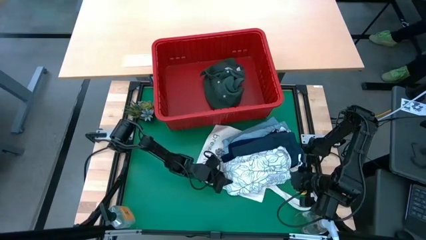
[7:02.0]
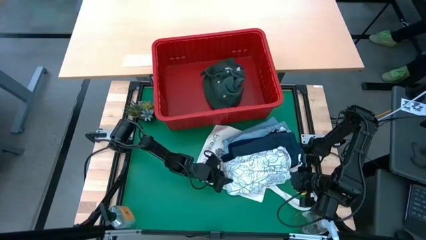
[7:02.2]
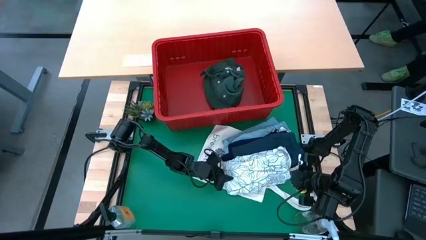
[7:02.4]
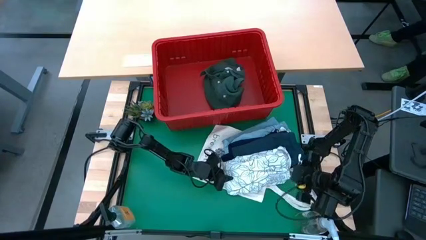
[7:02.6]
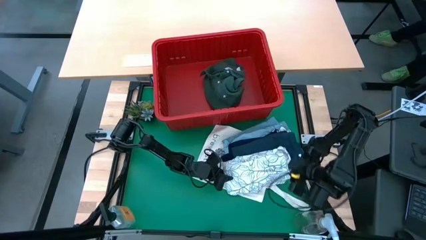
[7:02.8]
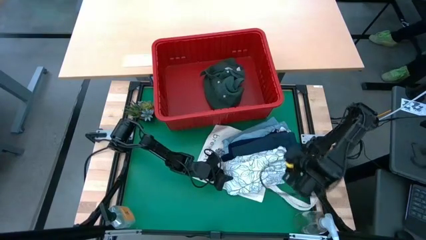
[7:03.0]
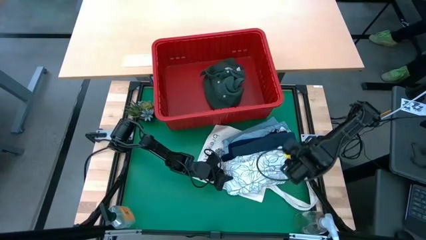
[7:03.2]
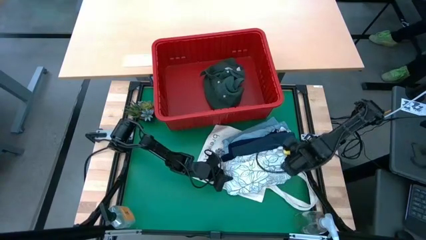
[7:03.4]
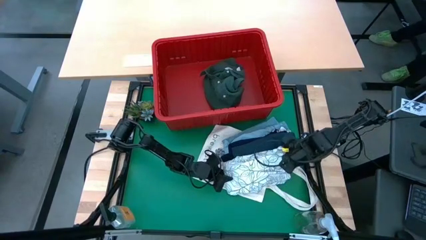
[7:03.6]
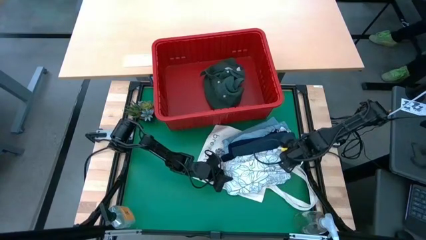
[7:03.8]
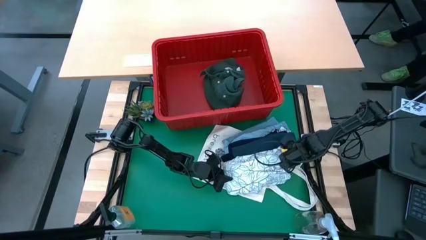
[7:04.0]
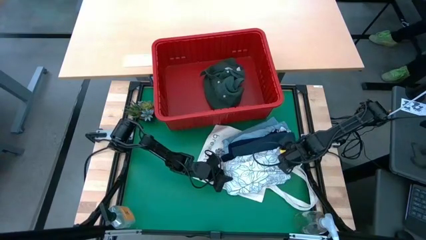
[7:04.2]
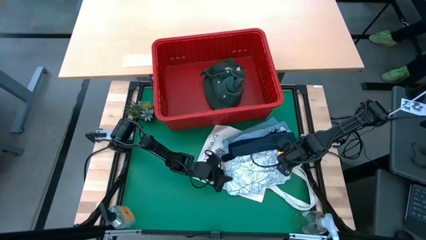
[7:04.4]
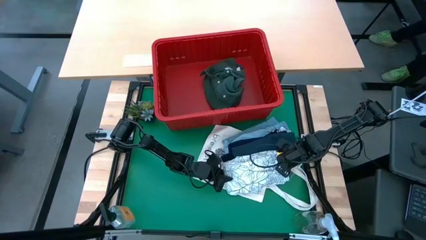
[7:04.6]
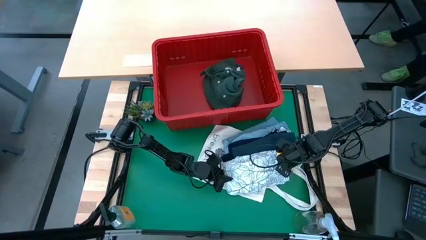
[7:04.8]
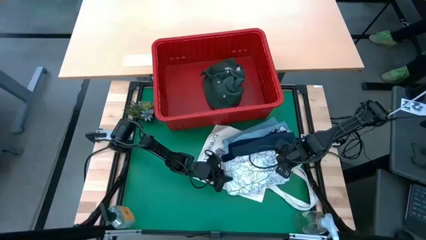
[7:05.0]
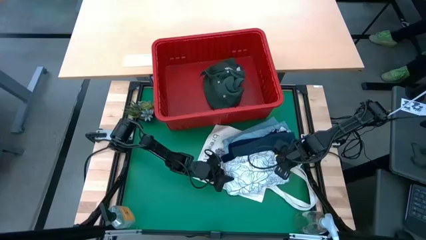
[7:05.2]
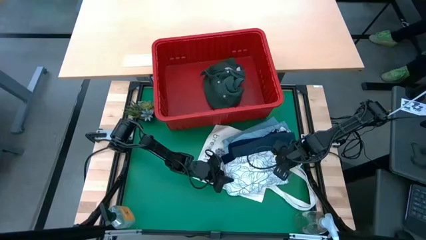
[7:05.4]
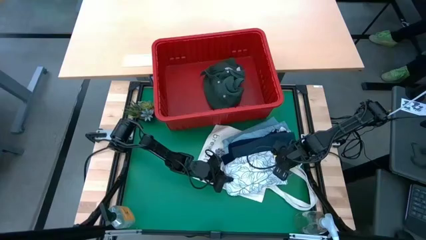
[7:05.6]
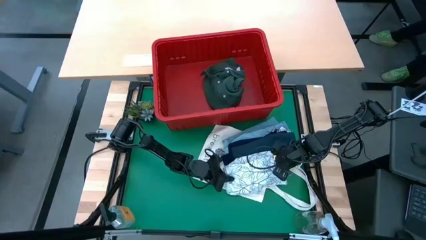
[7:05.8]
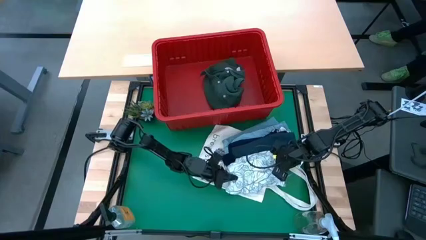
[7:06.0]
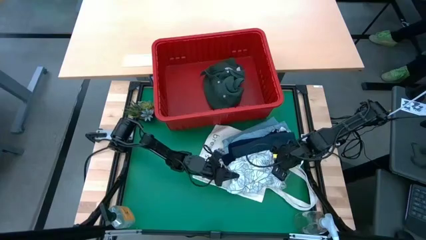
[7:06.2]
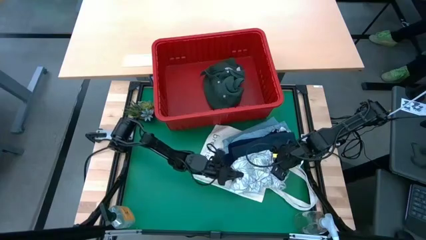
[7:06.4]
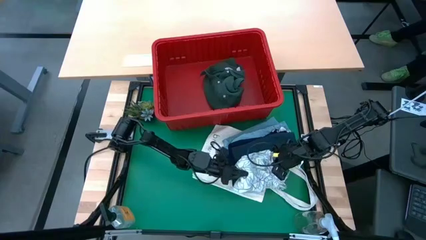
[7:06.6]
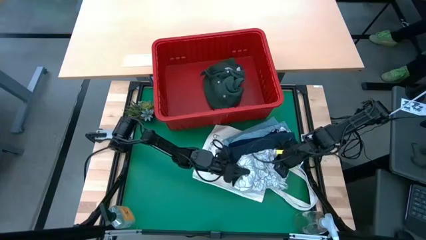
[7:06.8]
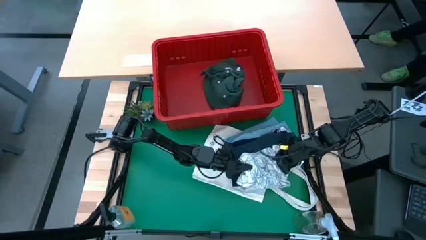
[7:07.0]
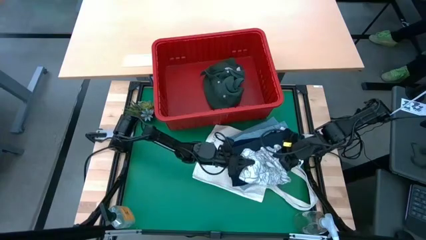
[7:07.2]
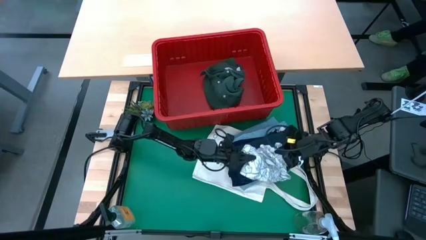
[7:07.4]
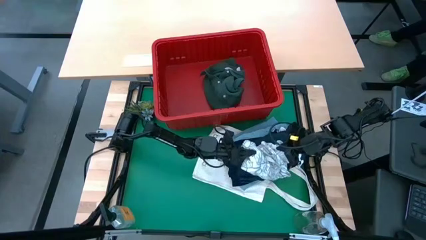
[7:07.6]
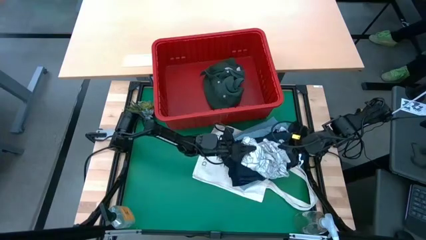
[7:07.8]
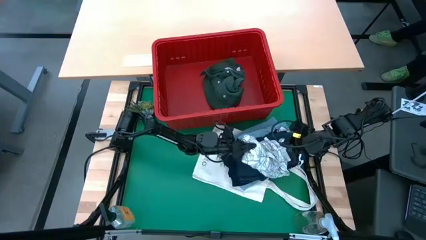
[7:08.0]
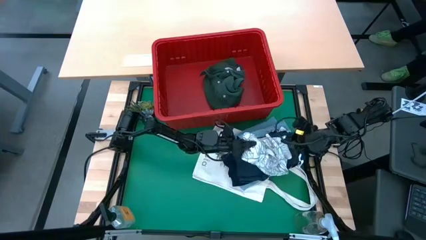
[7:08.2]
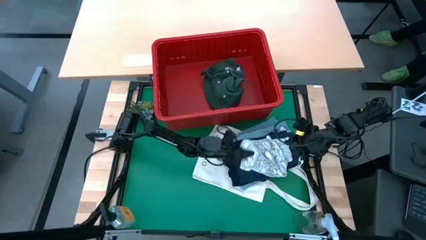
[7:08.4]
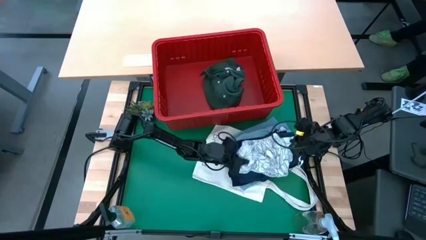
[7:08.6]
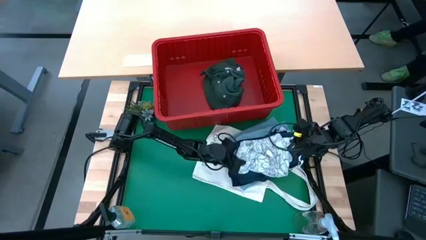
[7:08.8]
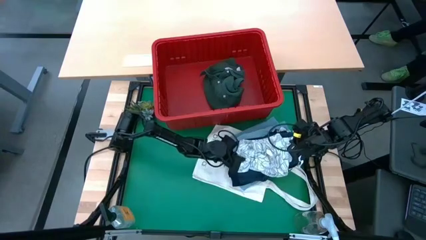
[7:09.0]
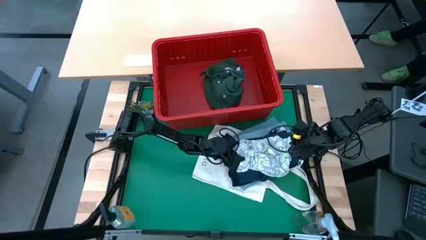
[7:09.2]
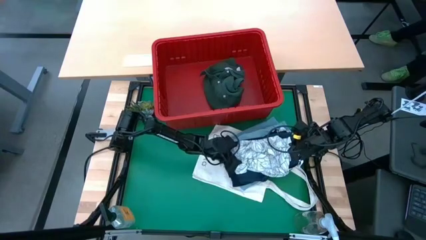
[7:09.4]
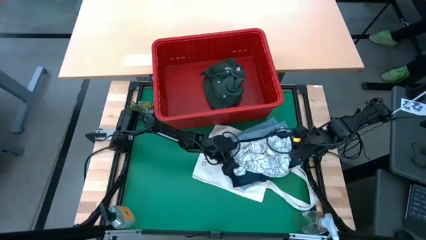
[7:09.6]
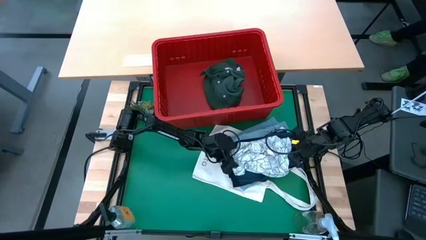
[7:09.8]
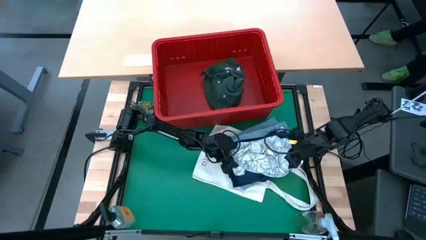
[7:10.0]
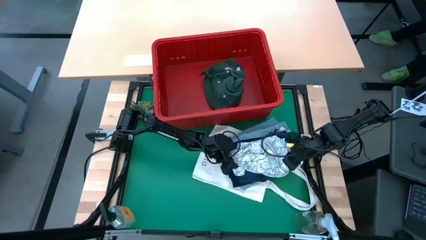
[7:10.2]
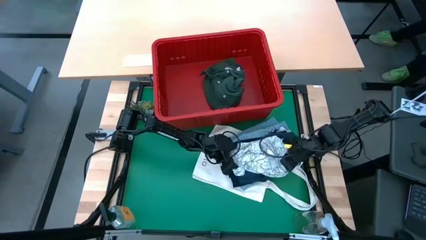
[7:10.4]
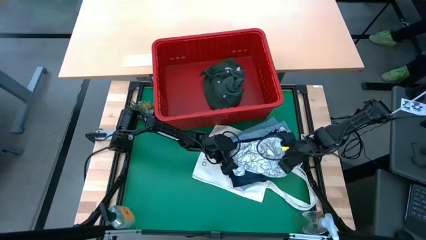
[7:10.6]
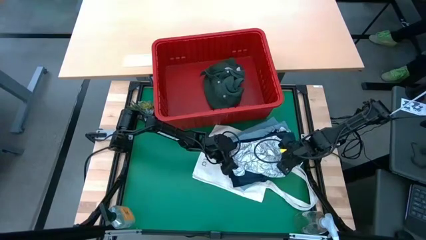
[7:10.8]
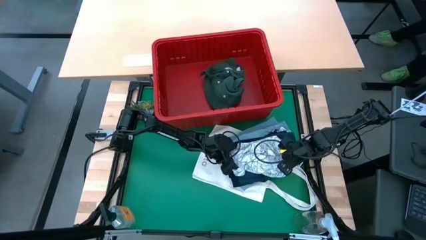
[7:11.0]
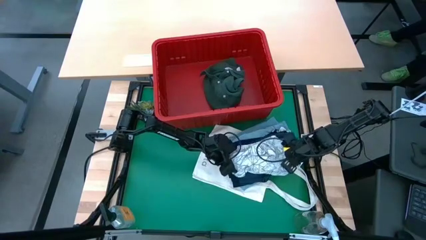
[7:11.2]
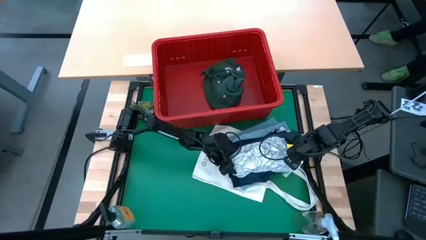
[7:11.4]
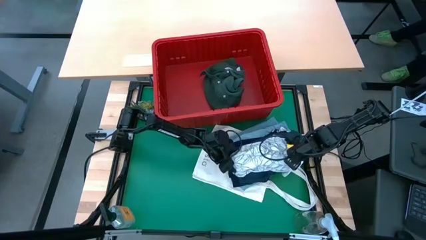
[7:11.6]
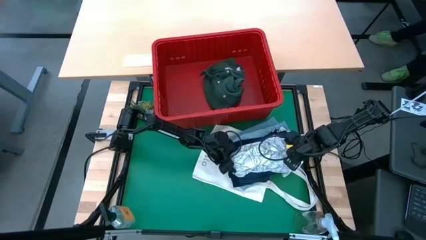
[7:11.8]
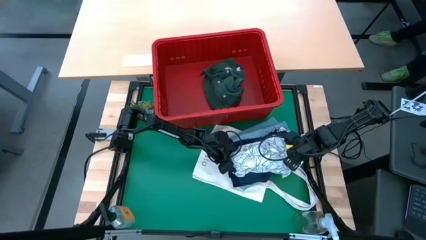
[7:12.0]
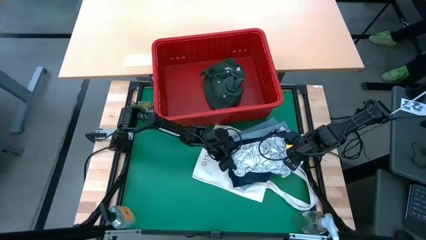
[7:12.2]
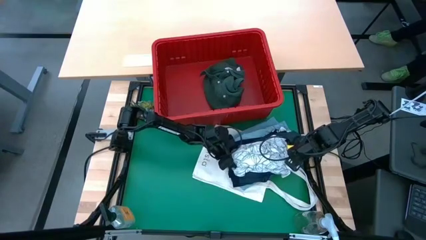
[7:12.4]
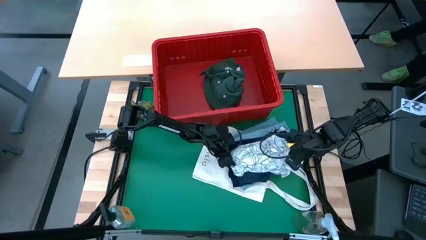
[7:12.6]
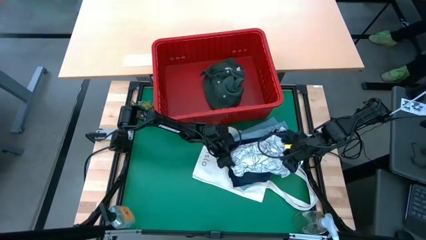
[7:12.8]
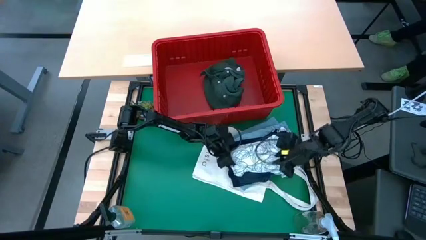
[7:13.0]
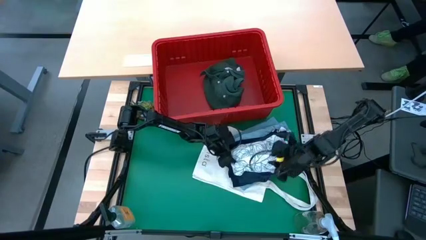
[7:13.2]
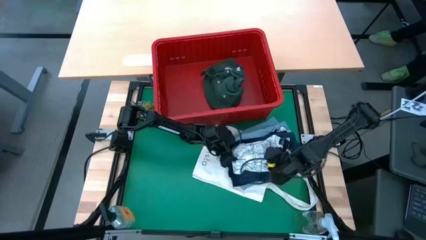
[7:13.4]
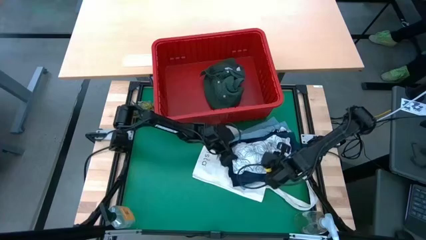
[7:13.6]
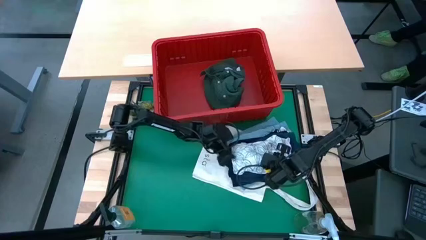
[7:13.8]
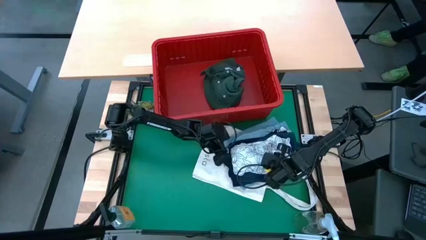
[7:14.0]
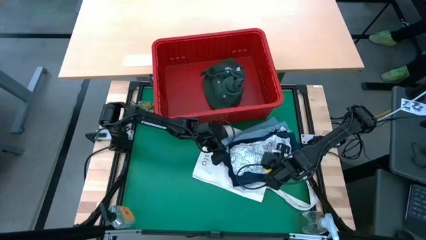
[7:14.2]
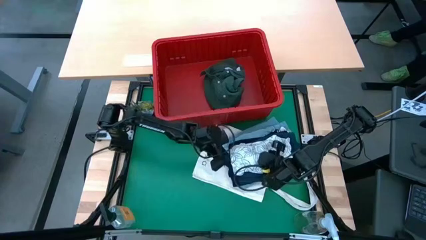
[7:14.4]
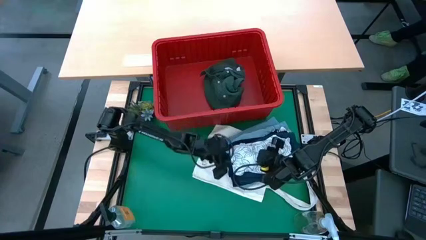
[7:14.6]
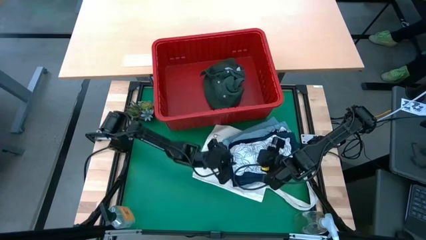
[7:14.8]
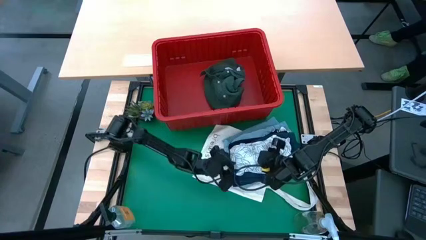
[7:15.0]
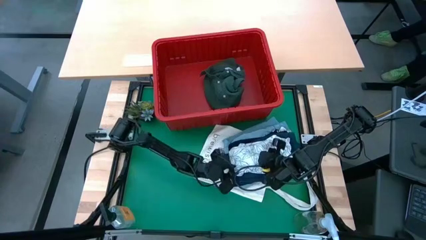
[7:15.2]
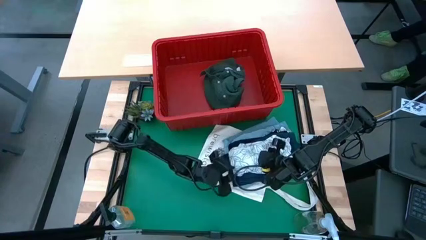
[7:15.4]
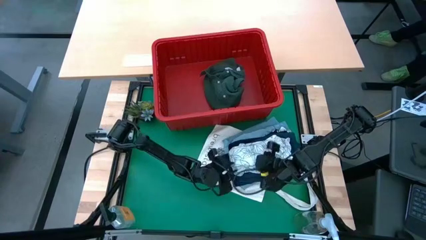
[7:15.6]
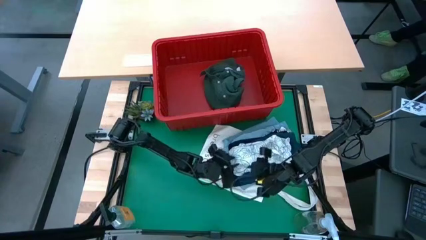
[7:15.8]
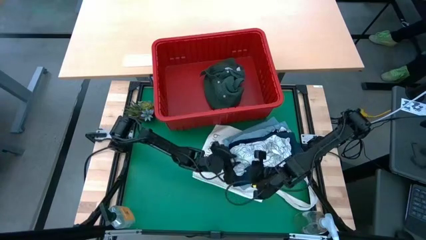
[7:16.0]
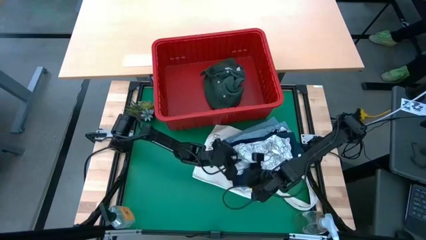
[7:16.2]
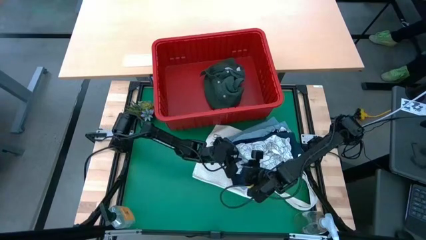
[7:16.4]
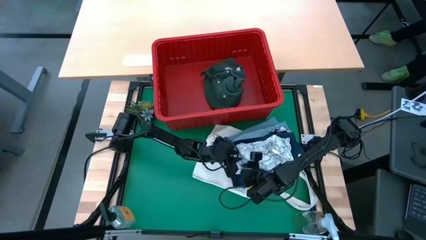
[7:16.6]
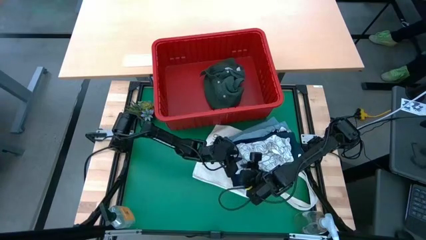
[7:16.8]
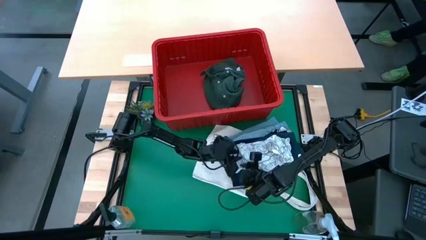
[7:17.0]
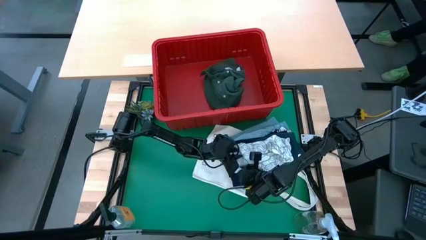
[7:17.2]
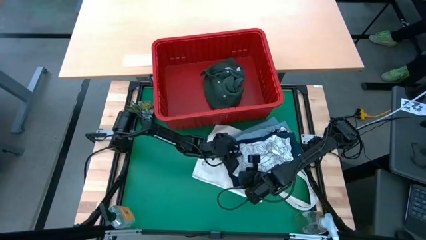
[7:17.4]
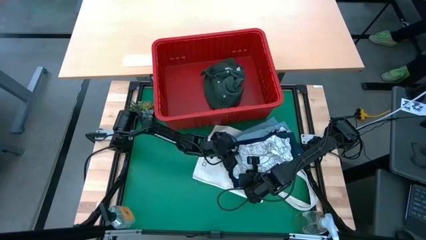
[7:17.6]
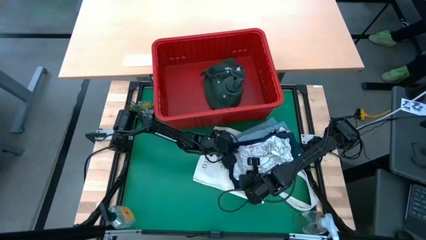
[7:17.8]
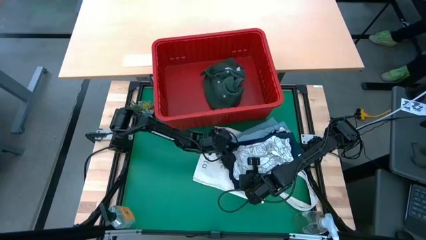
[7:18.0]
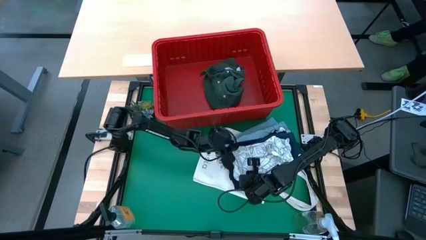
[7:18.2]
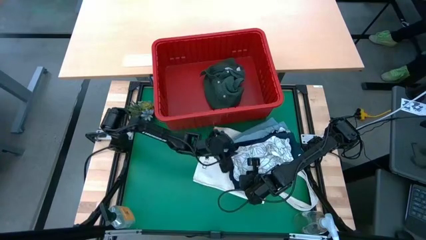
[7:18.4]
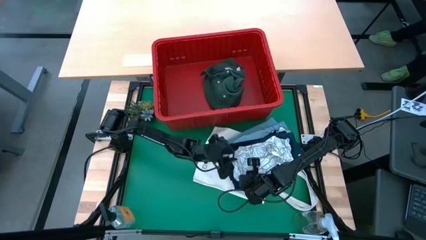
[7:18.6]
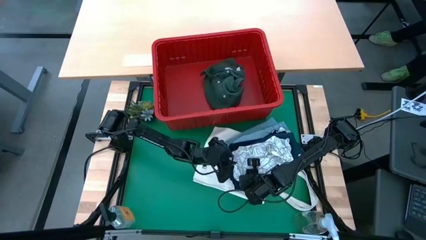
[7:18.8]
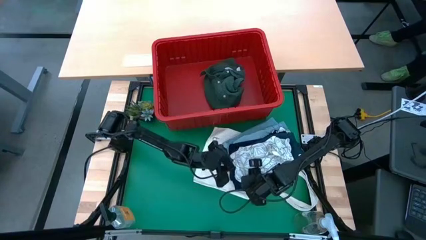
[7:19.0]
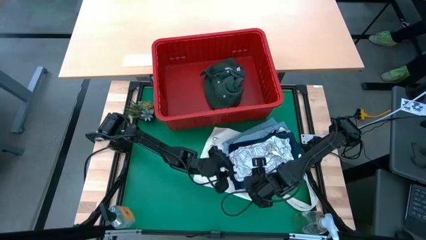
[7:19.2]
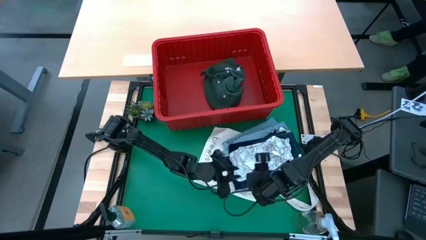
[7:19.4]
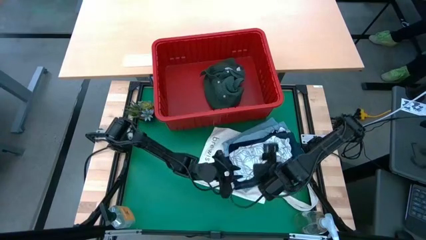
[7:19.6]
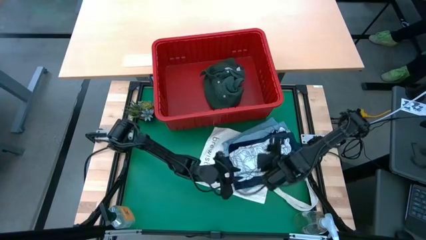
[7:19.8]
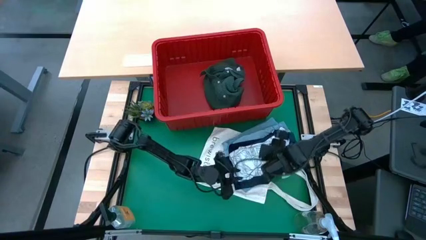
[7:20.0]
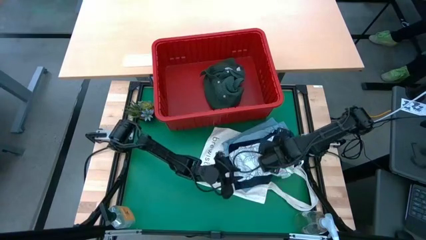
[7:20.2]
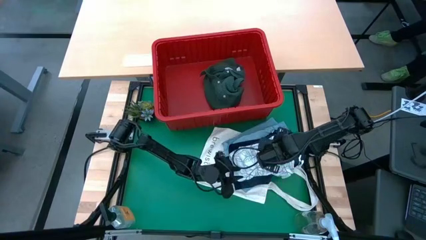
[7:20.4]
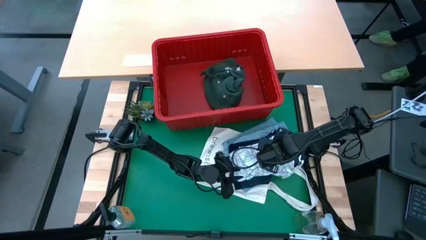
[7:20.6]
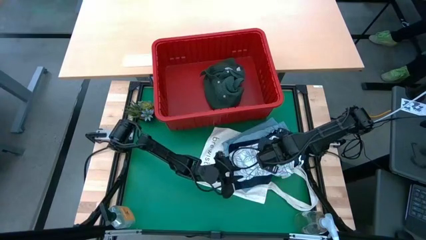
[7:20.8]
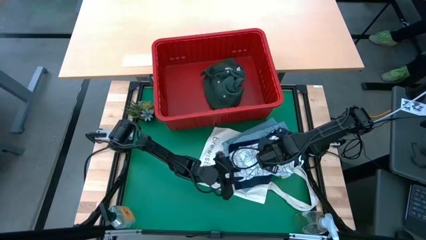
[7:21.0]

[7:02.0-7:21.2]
Task: Fold laundry
Fold the patterned white shirt
